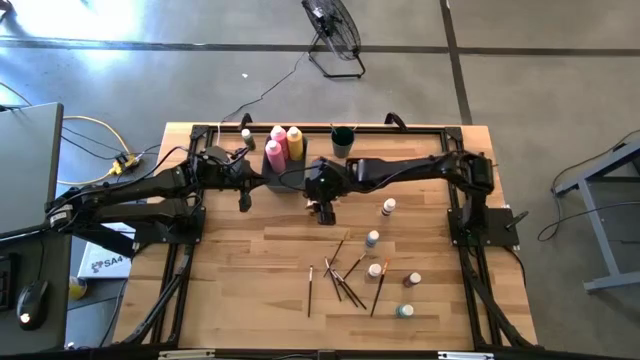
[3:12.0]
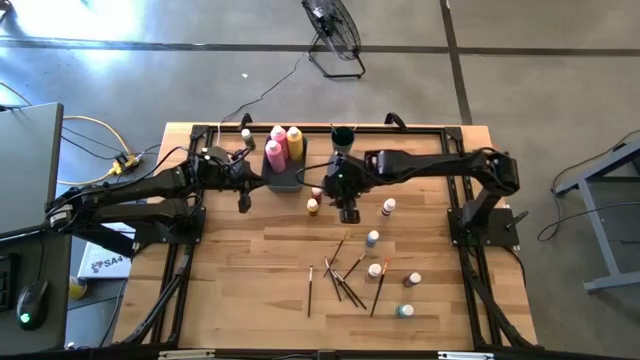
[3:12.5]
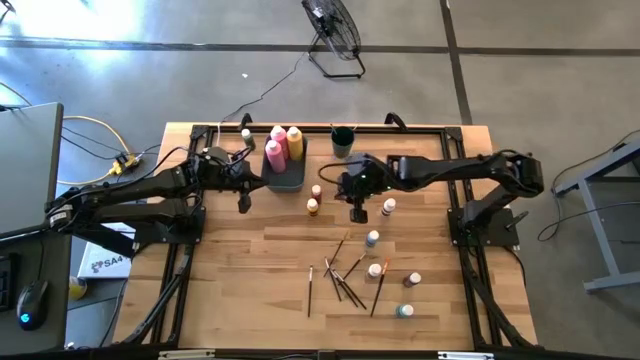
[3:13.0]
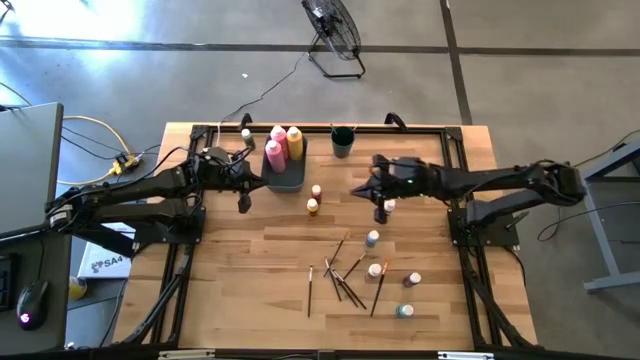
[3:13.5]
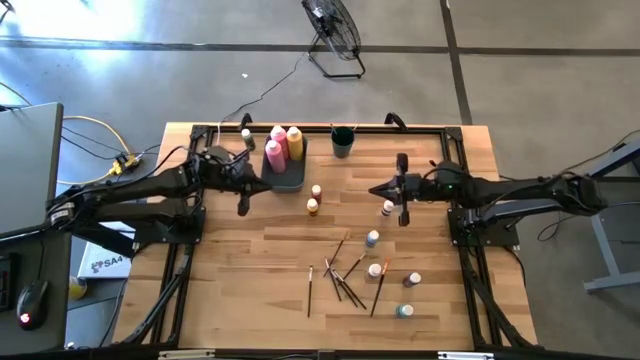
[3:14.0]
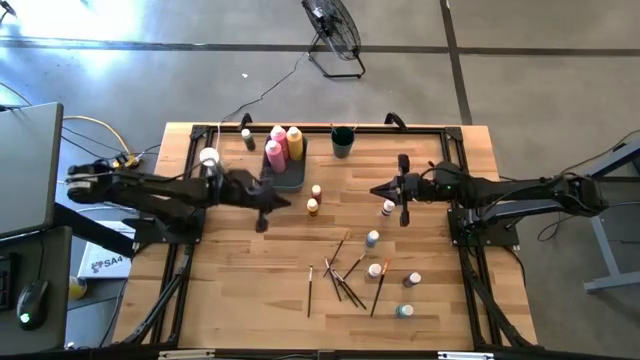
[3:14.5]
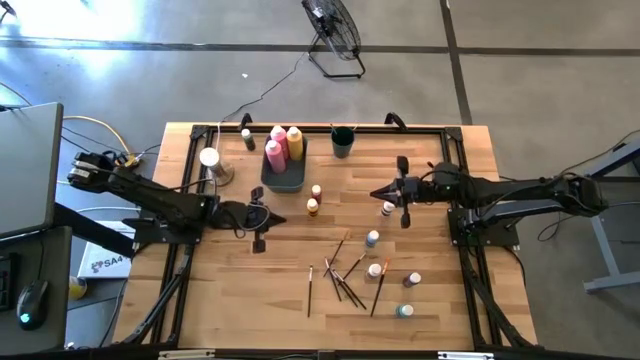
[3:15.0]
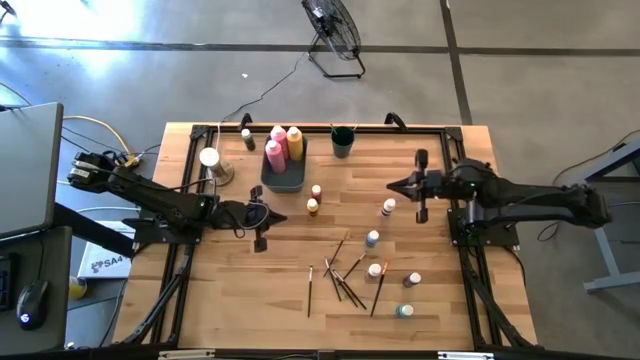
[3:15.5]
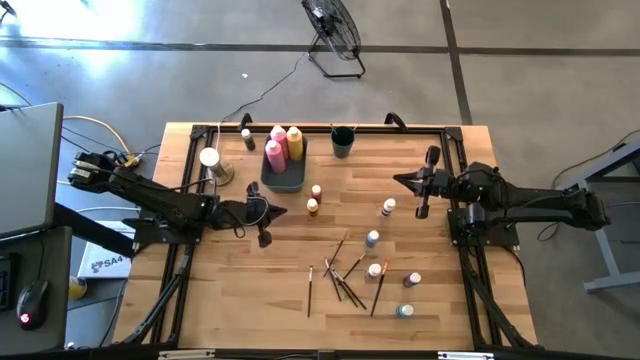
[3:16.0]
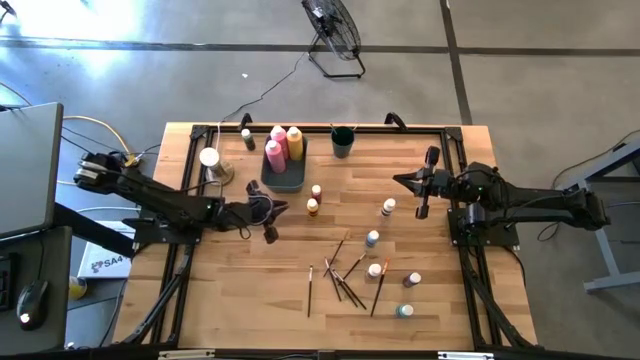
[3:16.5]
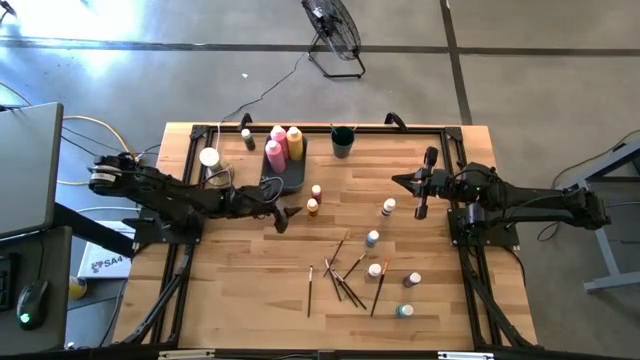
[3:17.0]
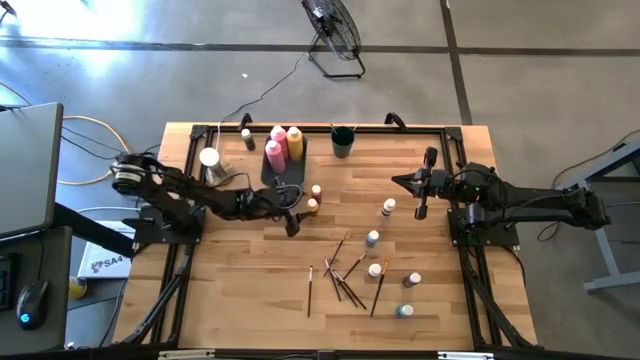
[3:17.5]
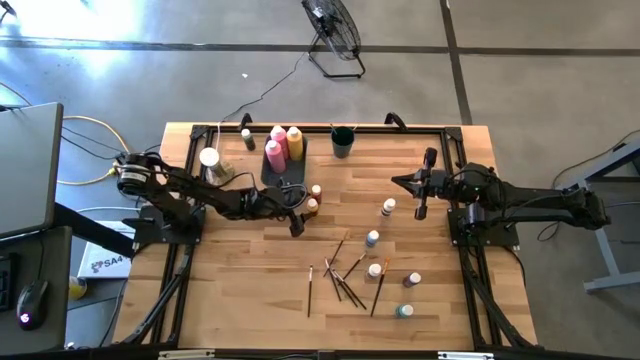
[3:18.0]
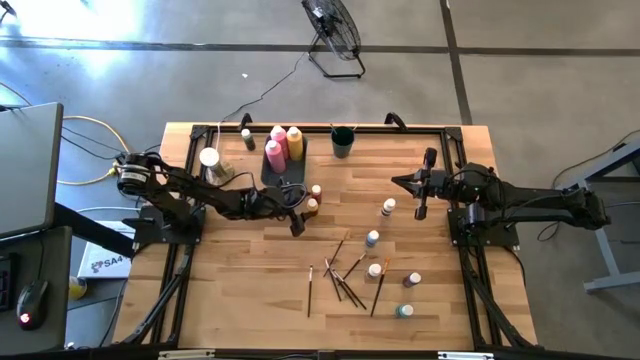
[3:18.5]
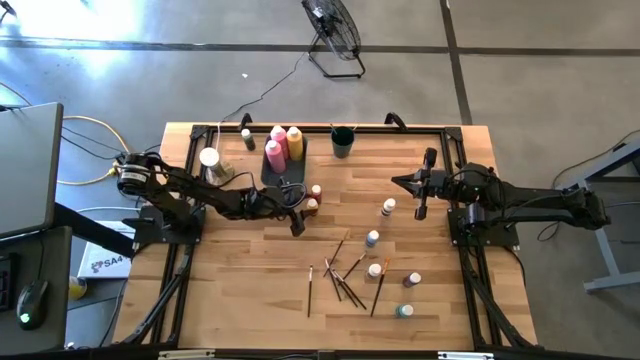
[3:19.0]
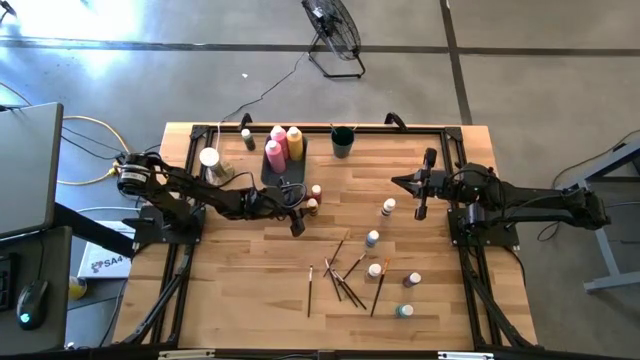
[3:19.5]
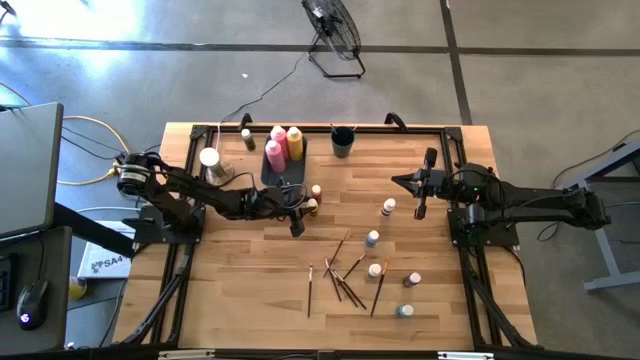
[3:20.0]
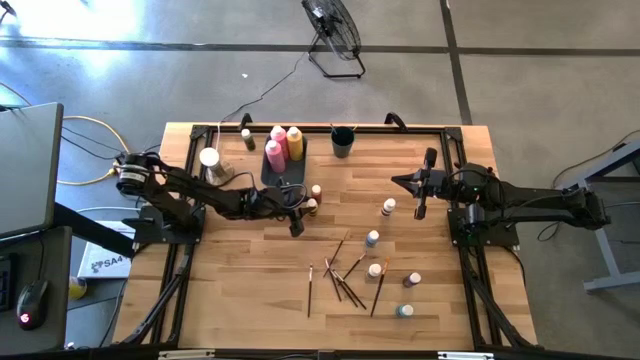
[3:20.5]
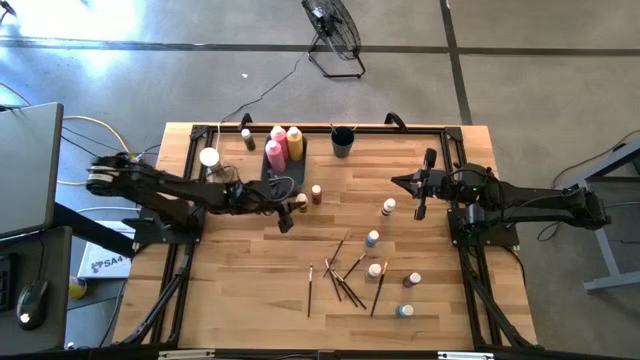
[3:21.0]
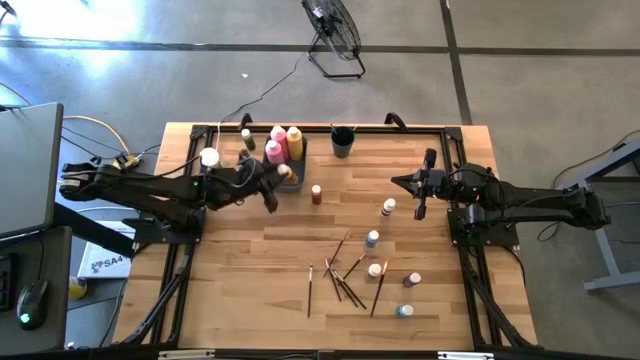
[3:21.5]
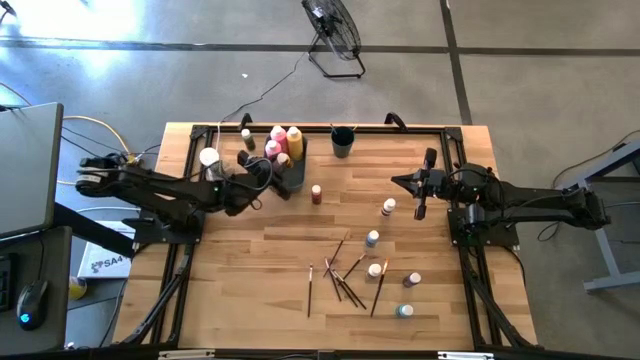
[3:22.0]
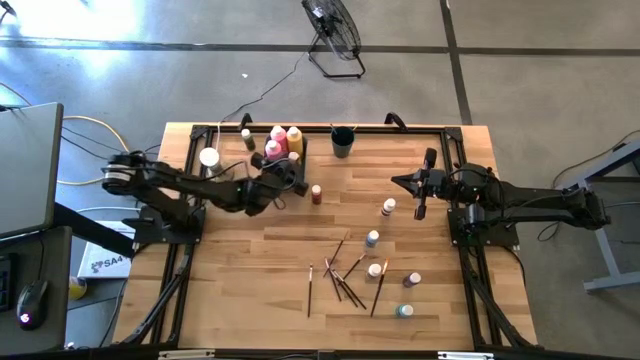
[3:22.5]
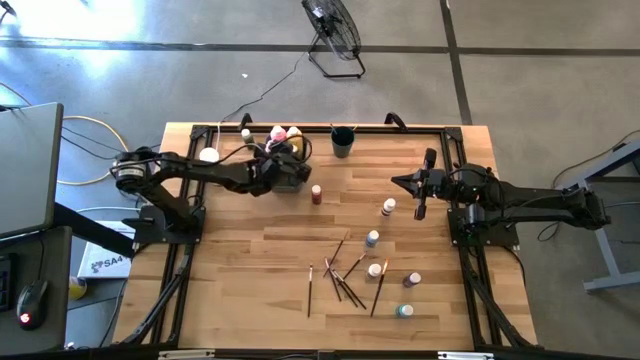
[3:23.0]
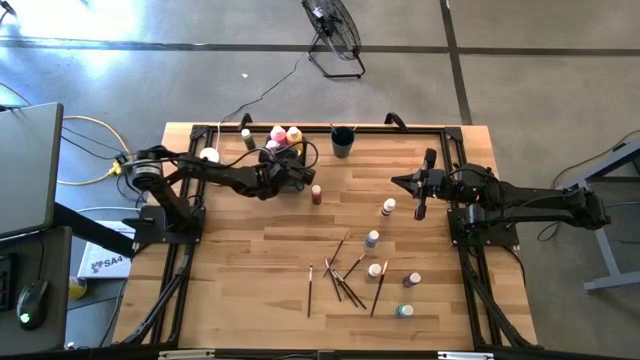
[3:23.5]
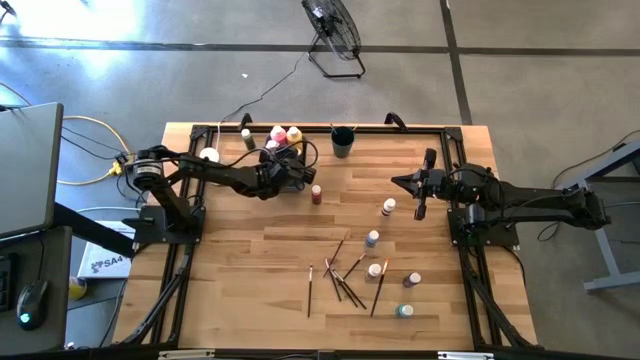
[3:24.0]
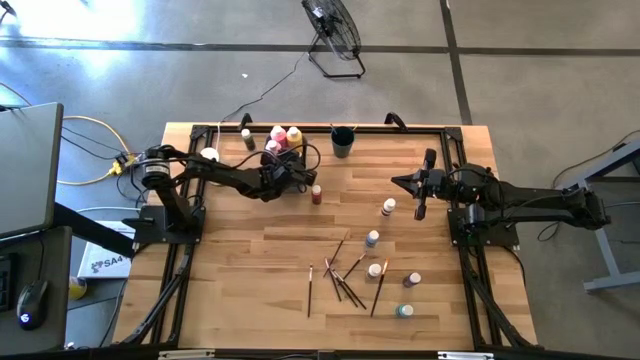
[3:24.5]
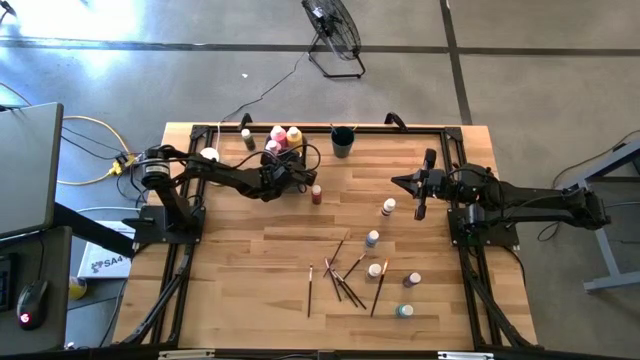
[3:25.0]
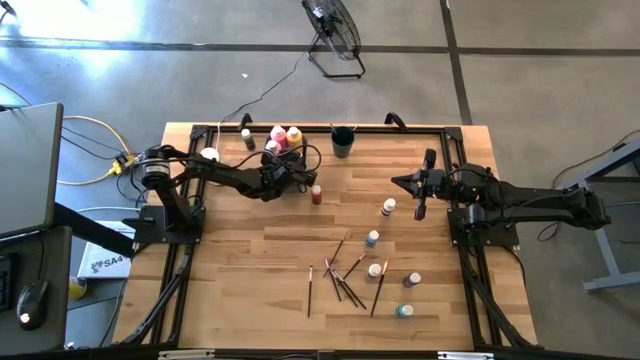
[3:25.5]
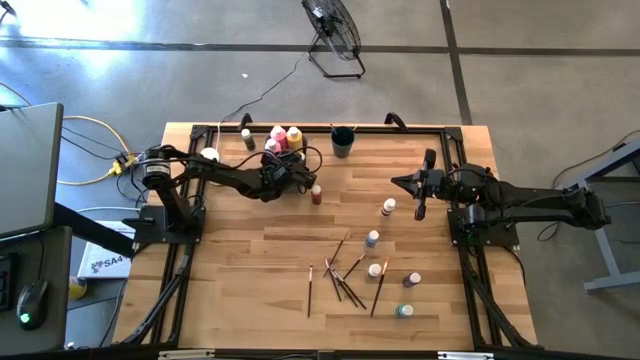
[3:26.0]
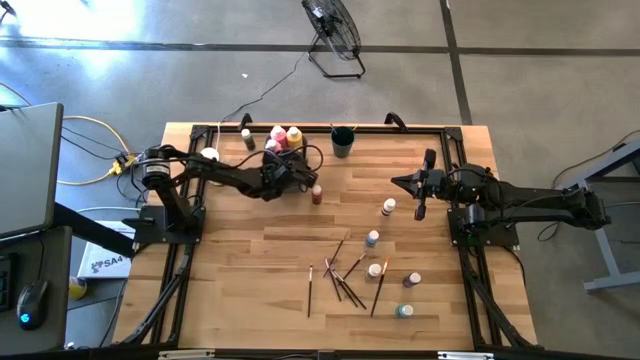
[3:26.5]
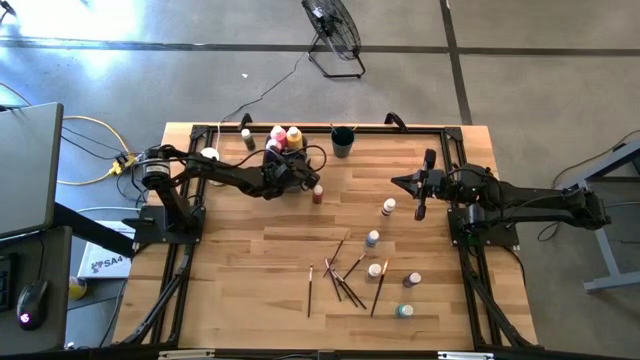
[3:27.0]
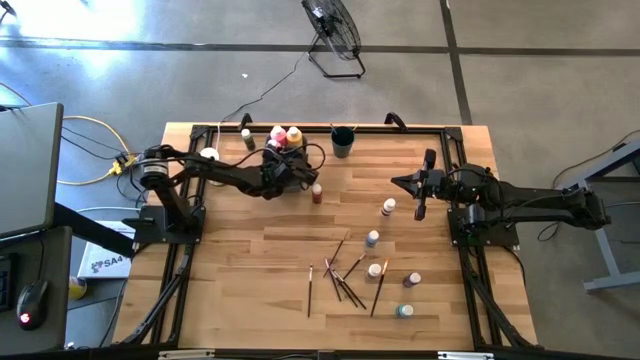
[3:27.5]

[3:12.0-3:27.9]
Task: Pick & Place Paint Supplies
Put the small yellow paint bottle into the green bin

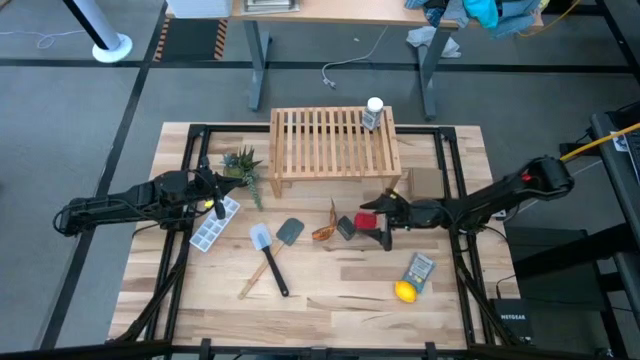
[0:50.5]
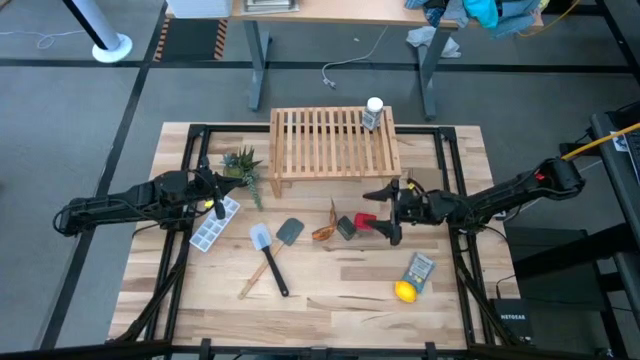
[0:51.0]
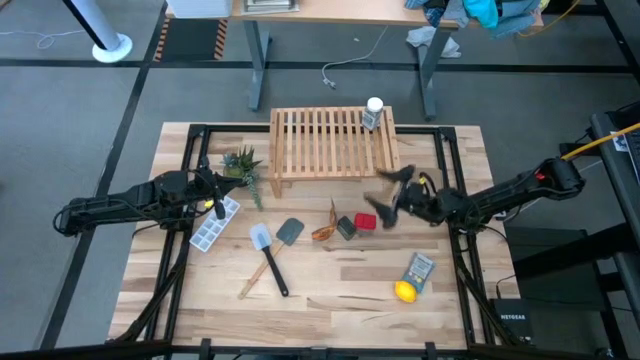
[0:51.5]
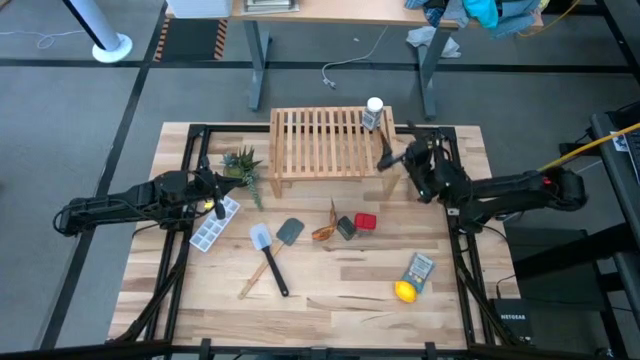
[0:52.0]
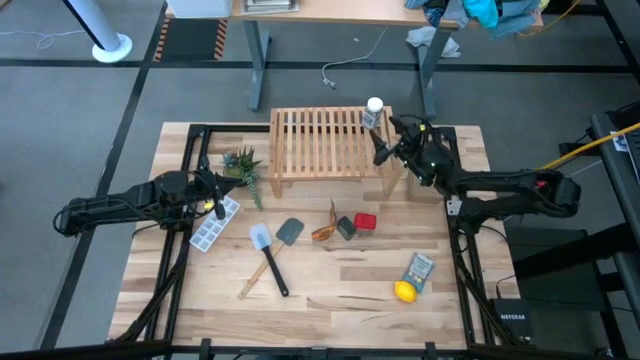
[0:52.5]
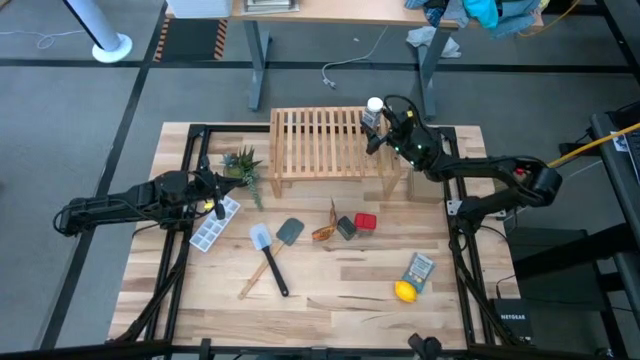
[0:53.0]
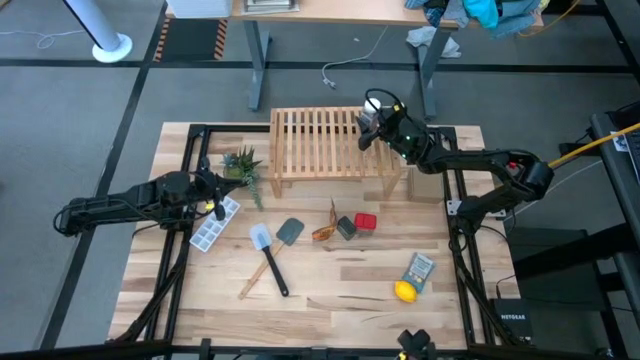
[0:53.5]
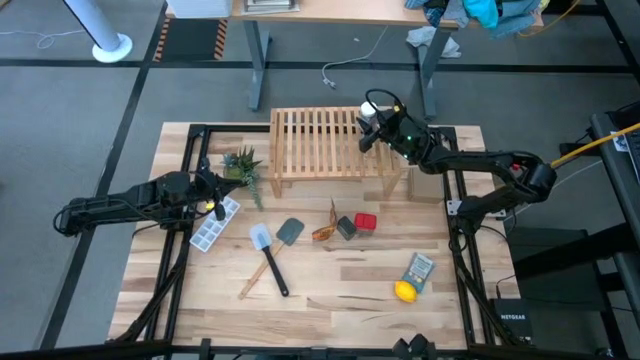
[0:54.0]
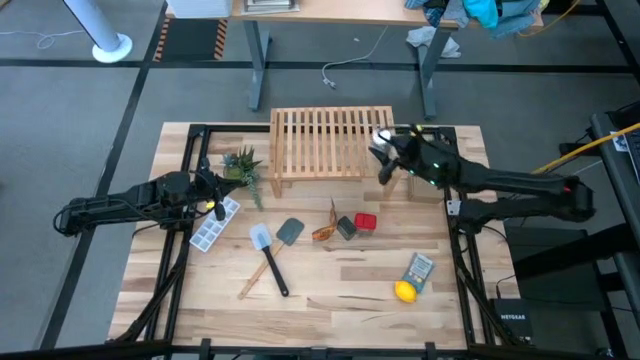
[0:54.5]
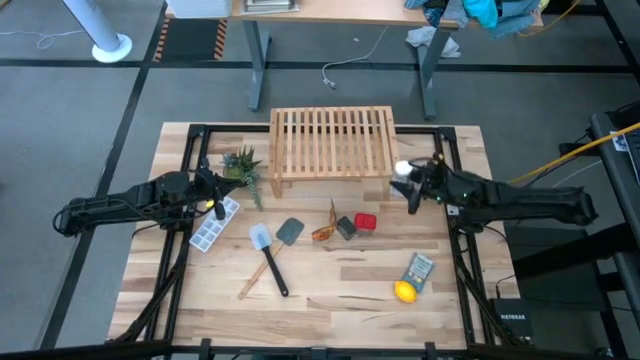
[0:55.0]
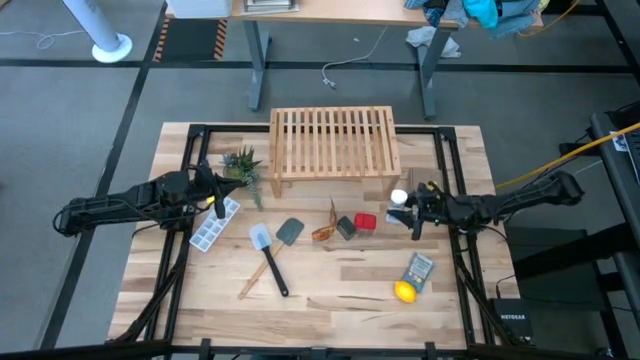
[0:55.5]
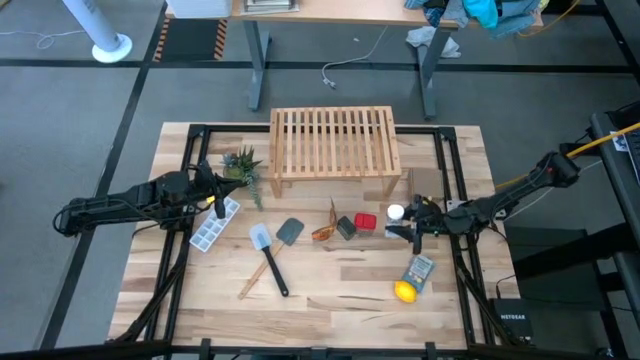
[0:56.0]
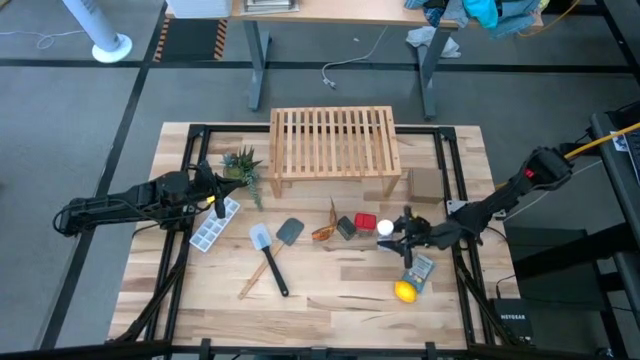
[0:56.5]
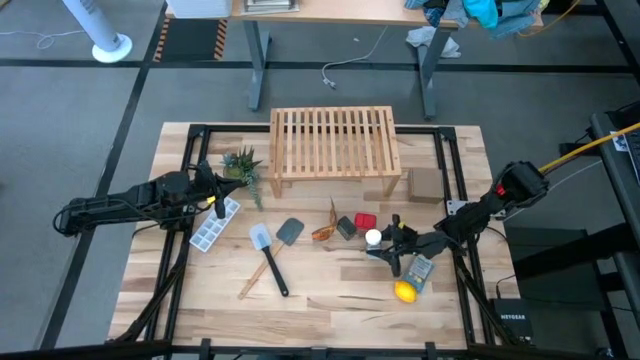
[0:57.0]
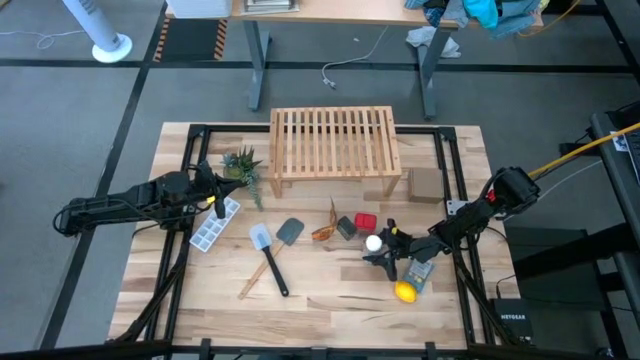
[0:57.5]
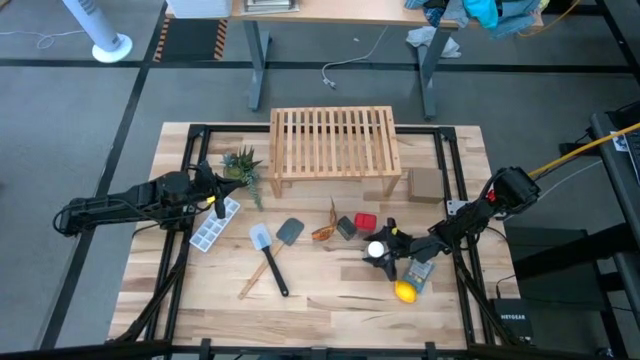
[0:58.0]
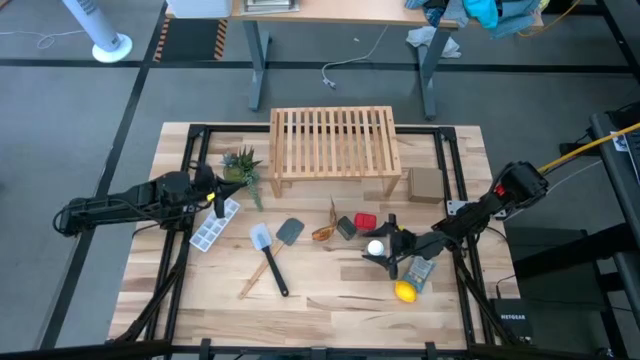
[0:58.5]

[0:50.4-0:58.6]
Task: Shelf spices
Remove the white seasoning bottle from the shelf
